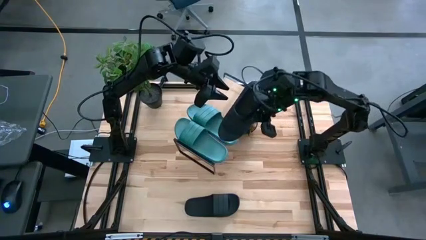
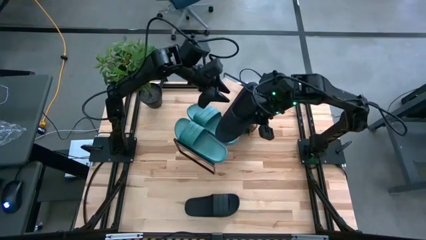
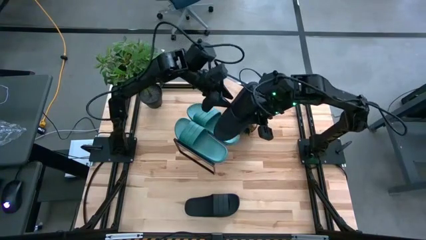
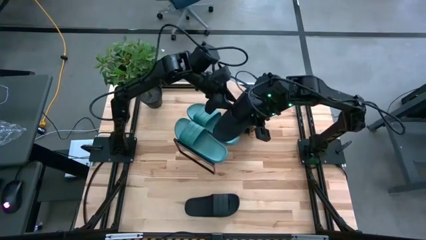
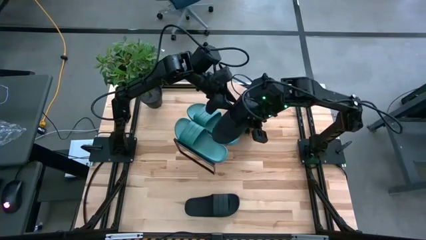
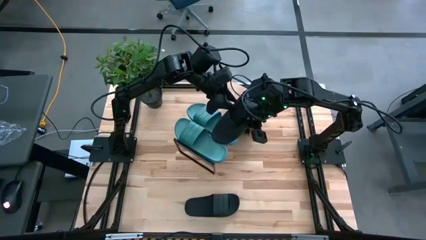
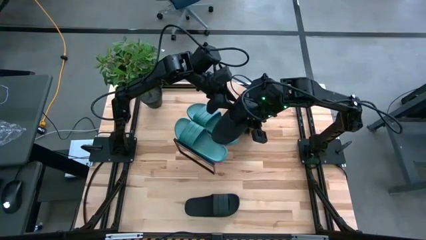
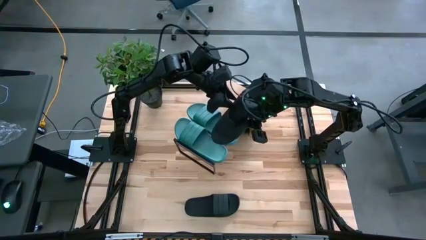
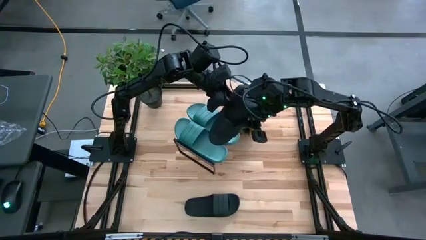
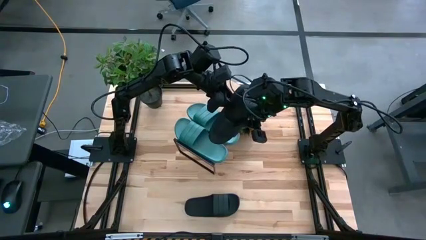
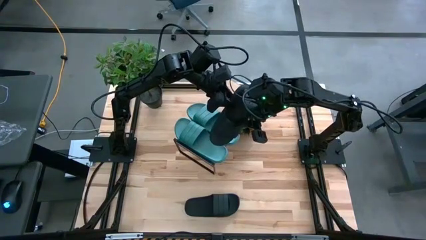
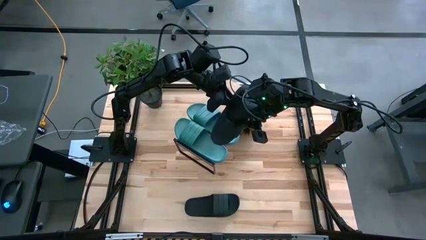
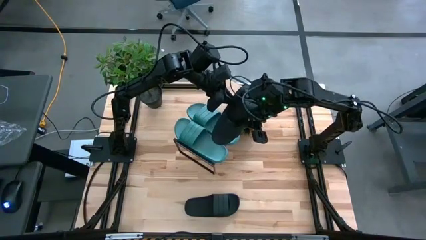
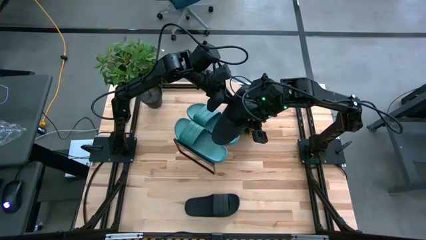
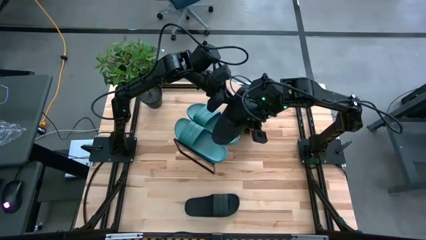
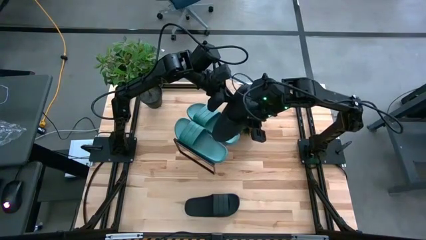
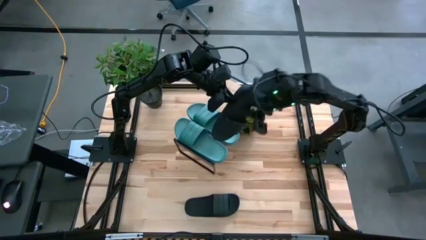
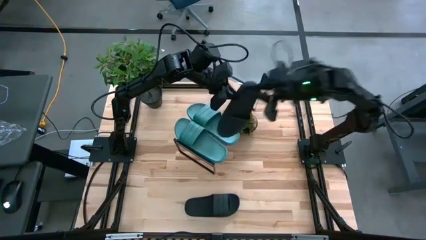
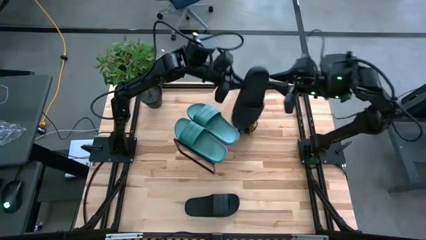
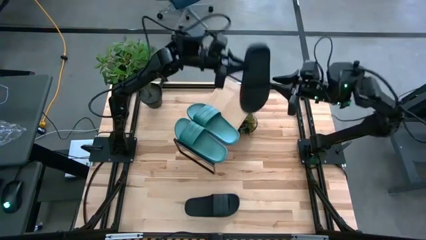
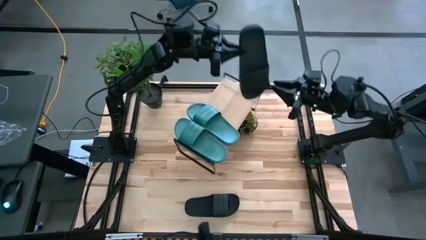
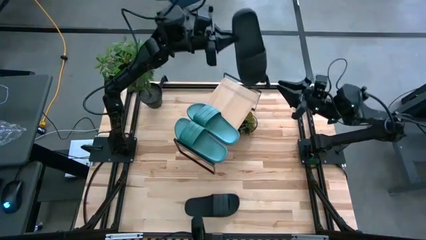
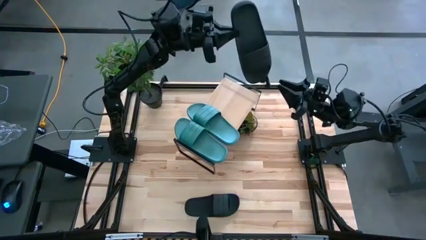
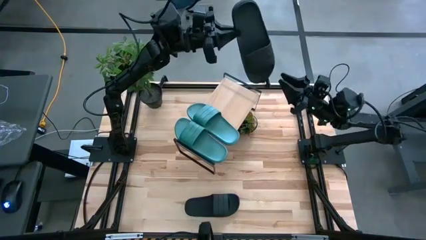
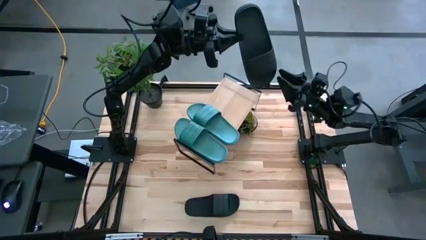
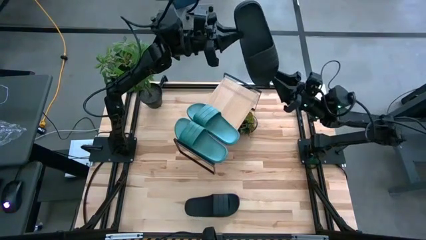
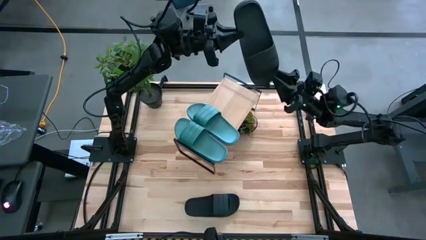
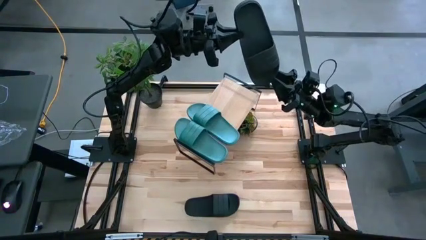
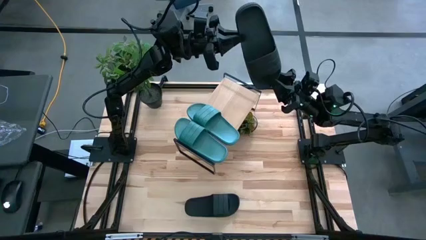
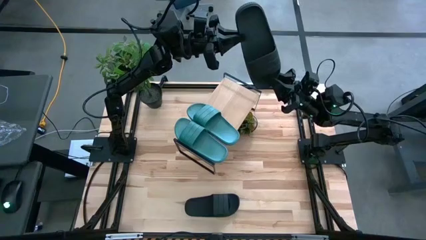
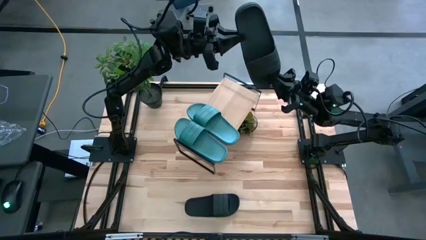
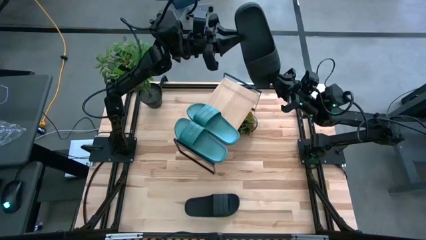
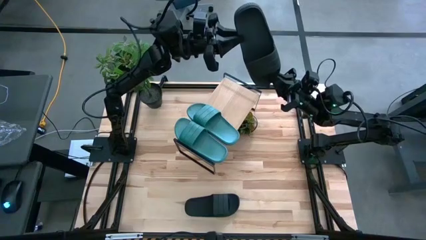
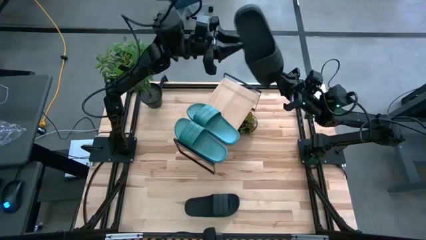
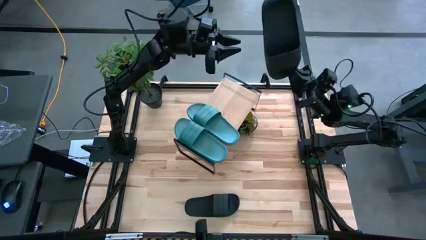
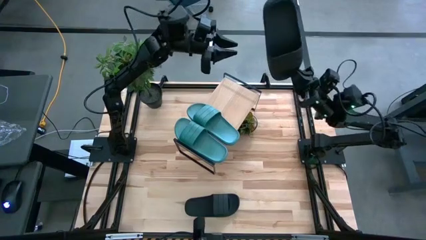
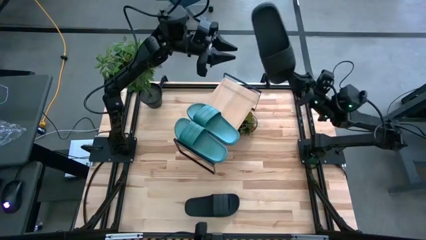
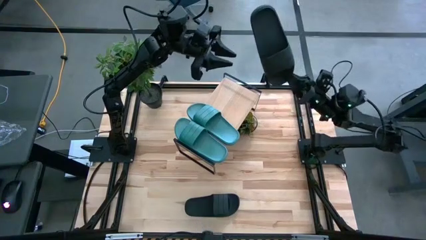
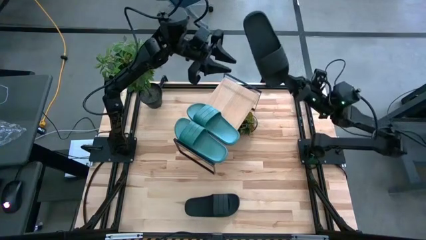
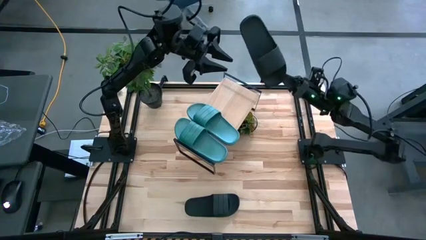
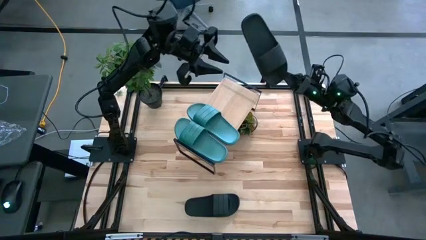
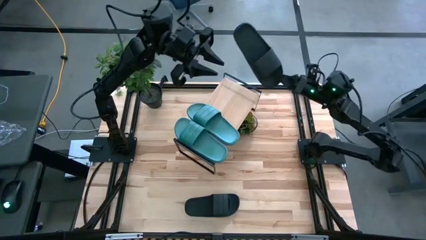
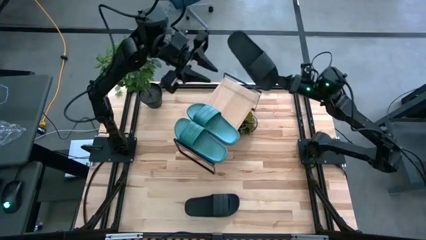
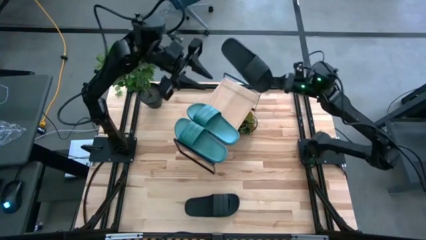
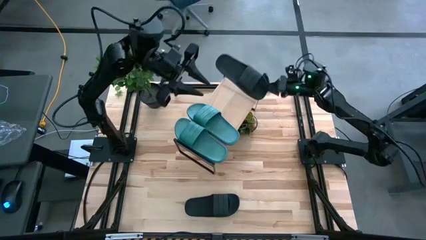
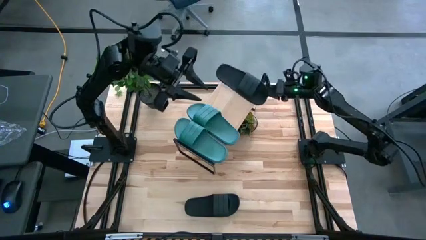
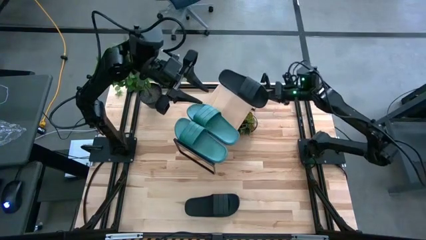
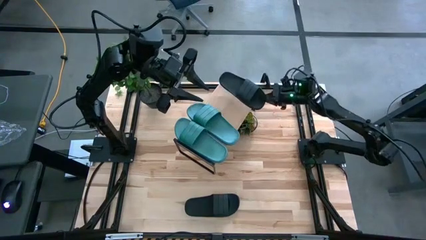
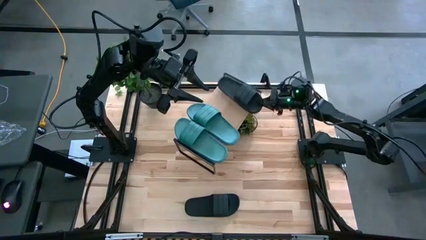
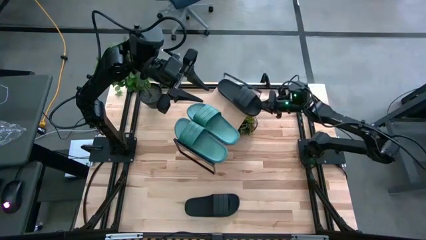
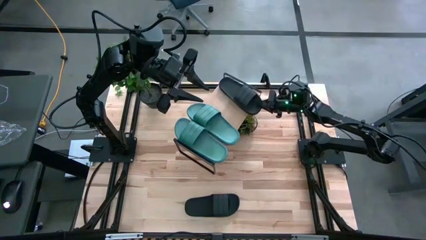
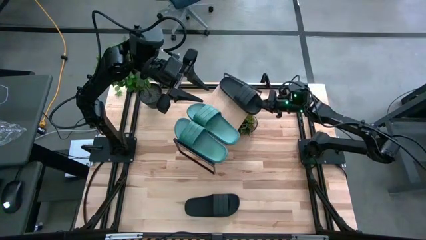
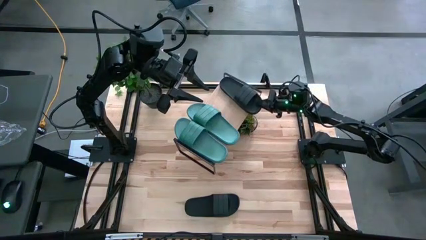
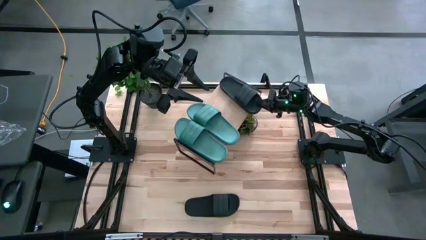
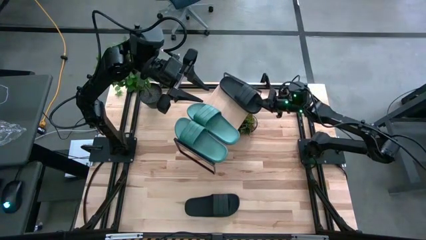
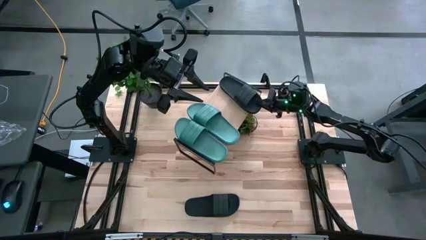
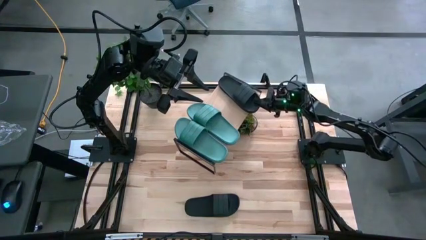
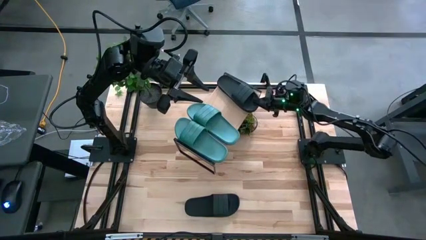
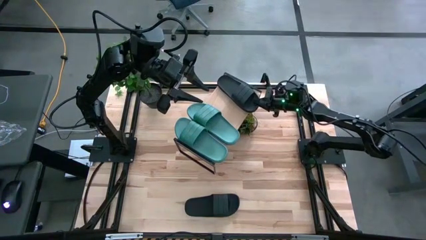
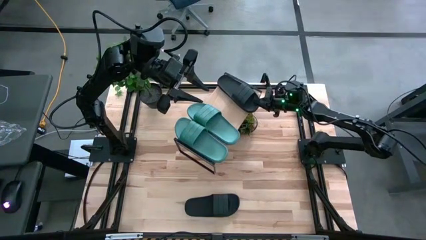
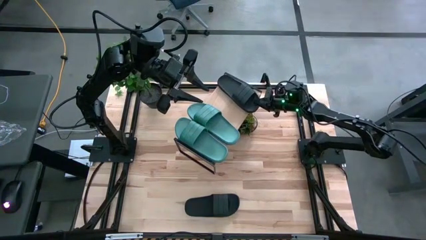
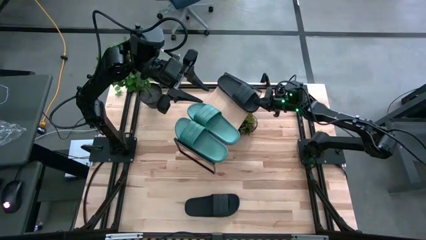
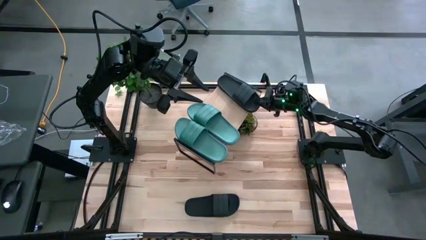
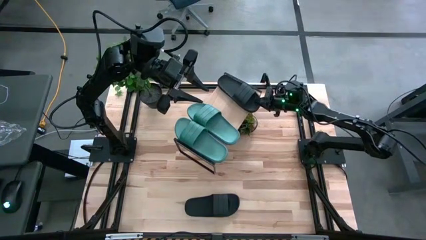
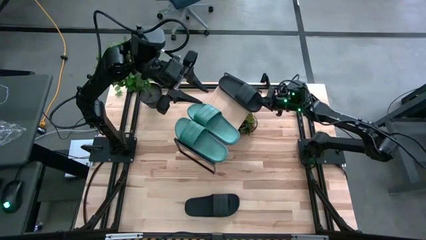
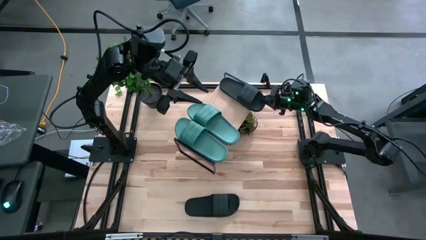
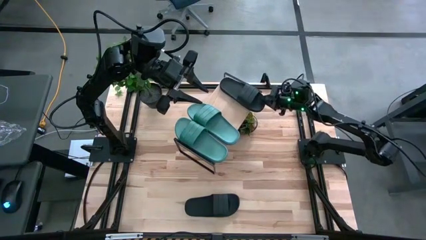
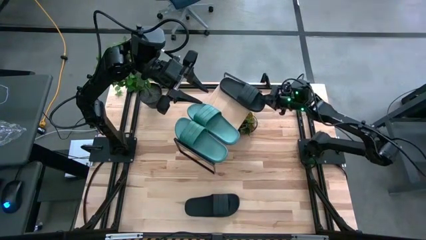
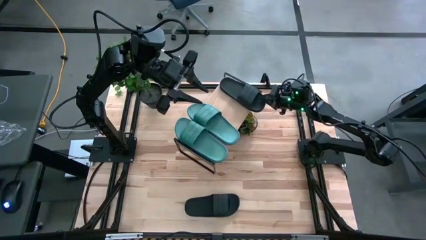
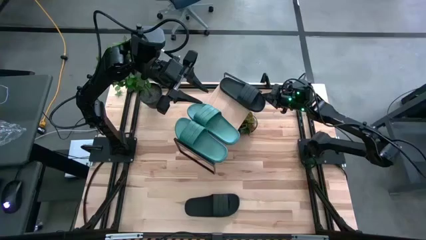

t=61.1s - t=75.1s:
Task: Pick and place slides into the shelf
Put the right black slide on the shelf
